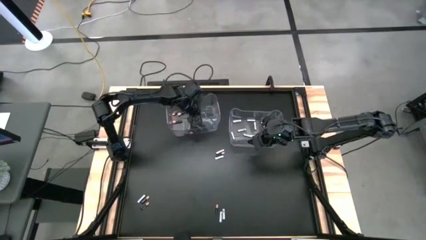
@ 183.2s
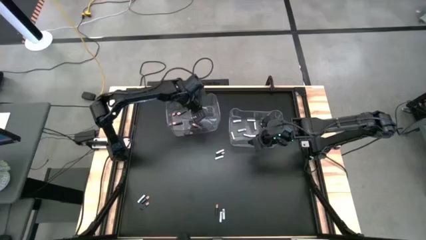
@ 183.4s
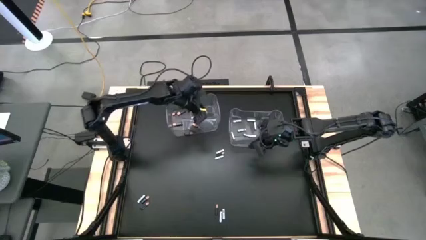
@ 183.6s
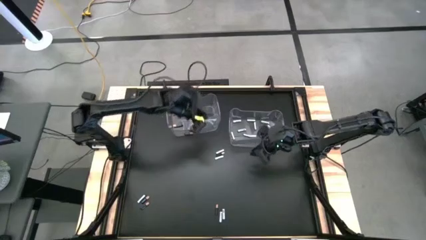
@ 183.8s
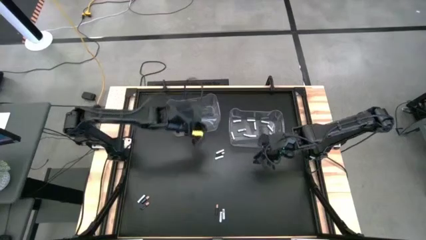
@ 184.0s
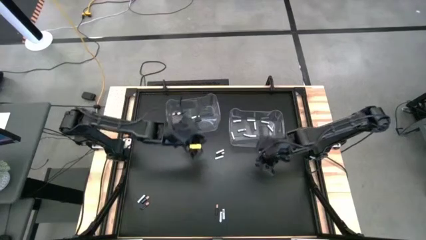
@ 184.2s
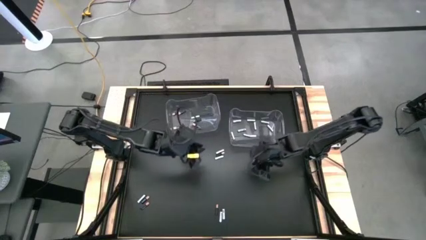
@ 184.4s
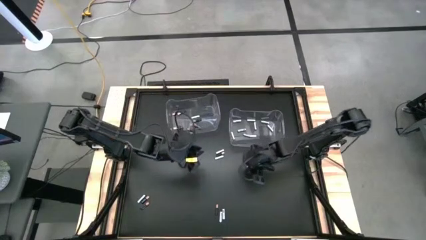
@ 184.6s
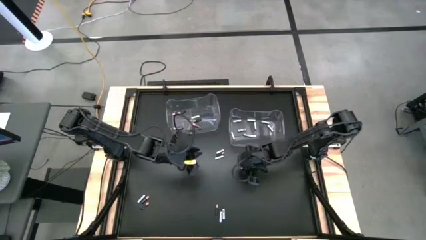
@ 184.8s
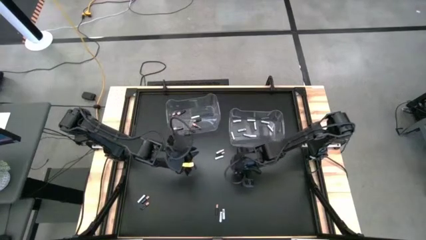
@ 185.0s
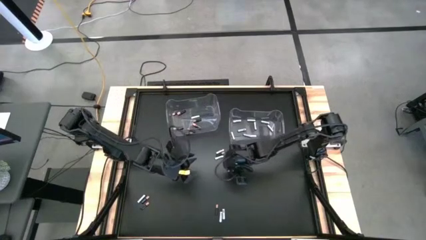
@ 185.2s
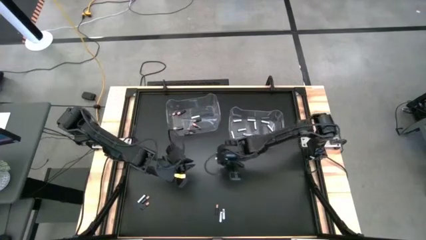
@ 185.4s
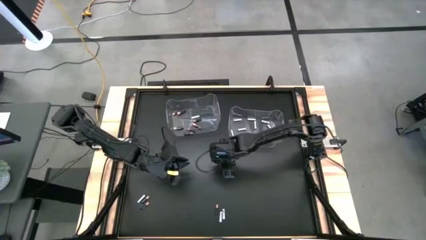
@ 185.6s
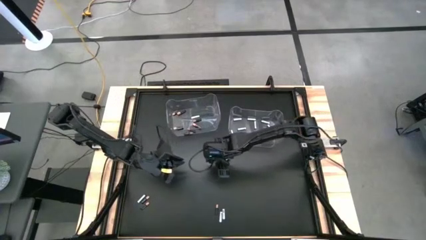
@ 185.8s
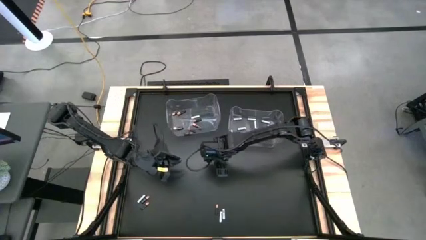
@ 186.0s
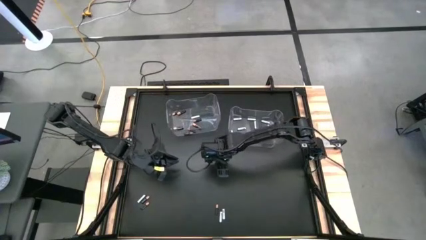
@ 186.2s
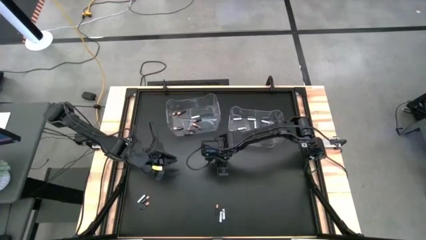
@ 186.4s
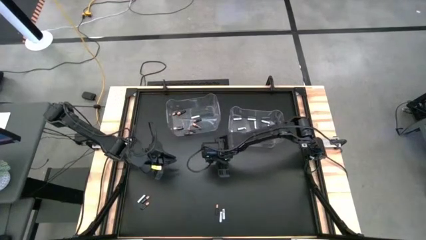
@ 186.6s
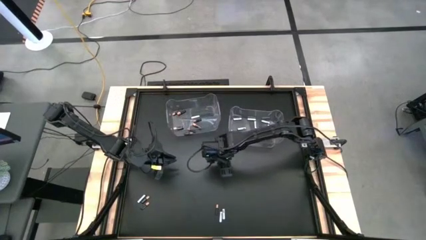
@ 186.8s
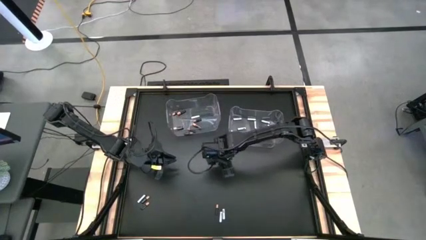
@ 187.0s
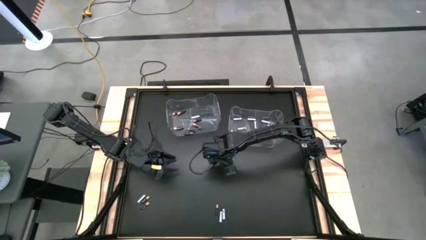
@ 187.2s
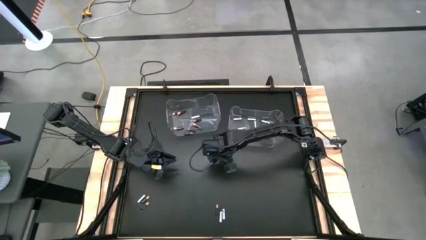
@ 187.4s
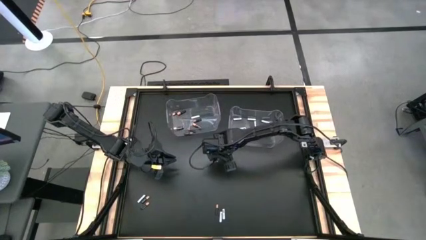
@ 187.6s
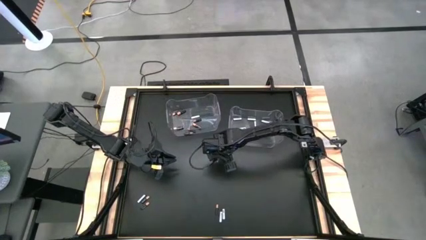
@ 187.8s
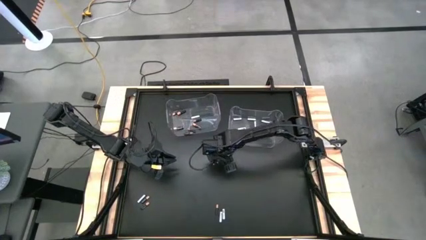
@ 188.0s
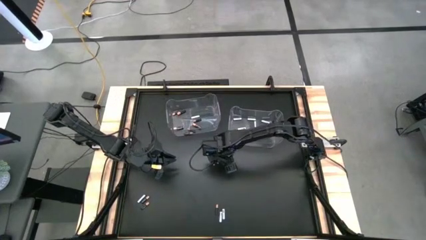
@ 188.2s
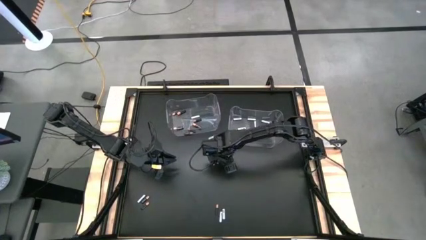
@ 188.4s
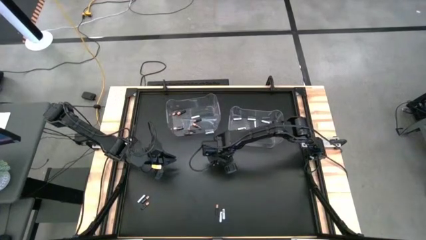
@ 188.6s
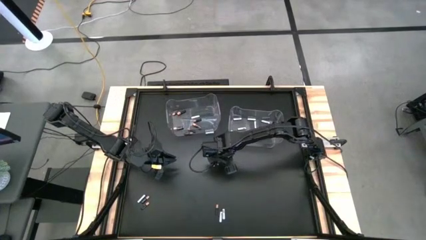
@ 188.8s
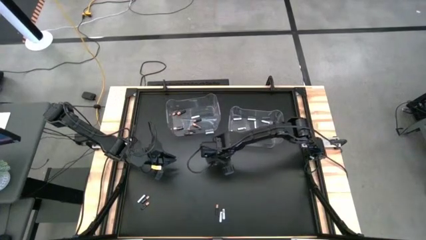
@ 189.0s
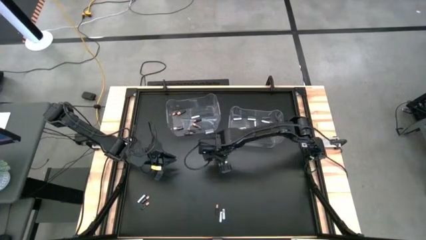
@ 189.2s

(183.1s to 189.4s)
Task: Sort batteries
Put the white battery into the right transparent bin

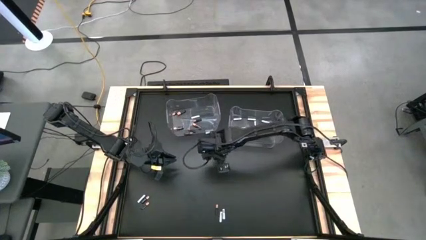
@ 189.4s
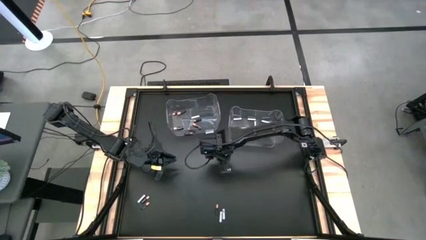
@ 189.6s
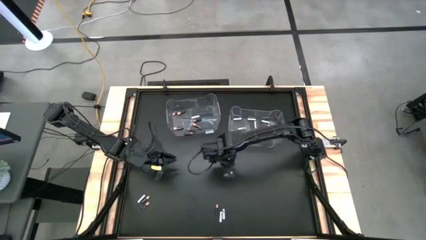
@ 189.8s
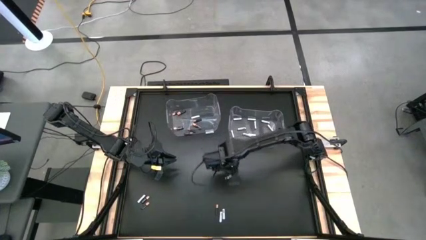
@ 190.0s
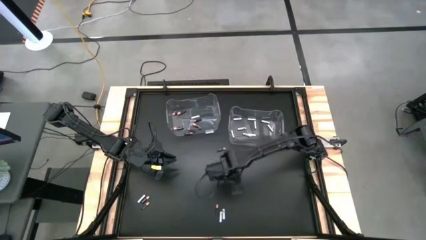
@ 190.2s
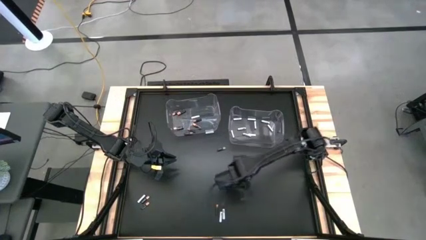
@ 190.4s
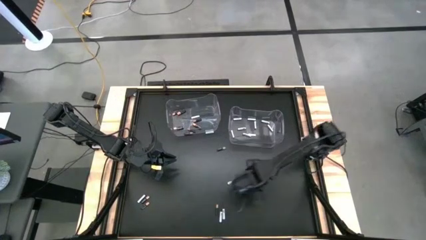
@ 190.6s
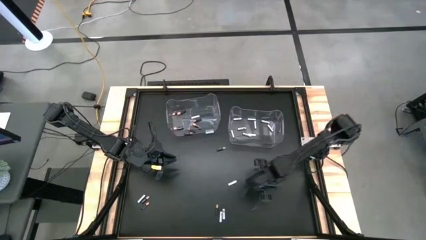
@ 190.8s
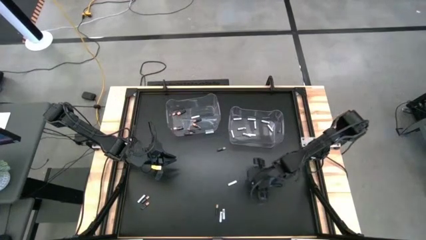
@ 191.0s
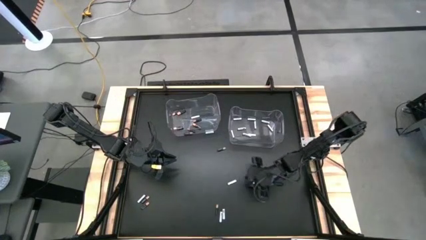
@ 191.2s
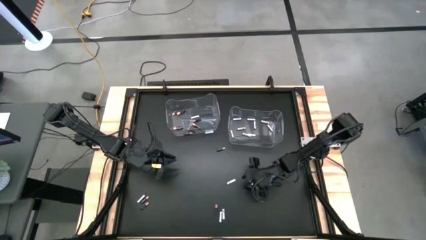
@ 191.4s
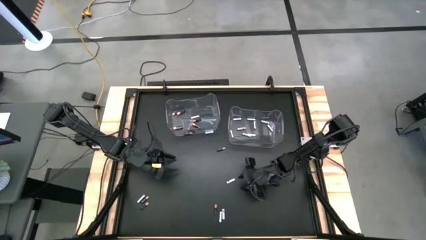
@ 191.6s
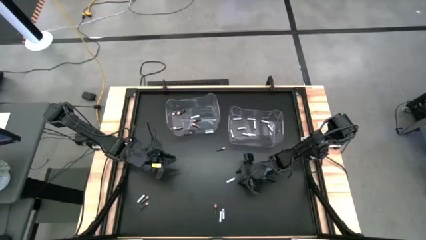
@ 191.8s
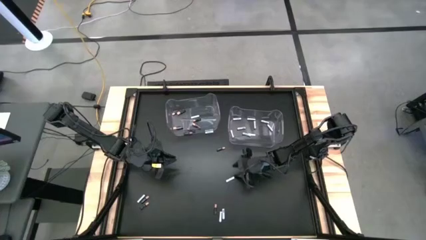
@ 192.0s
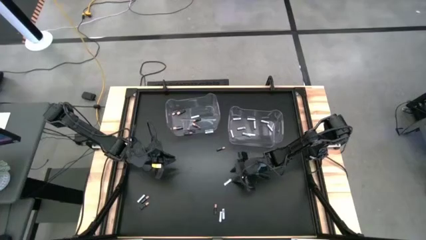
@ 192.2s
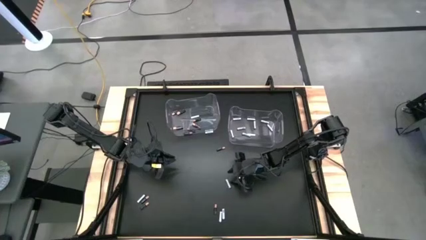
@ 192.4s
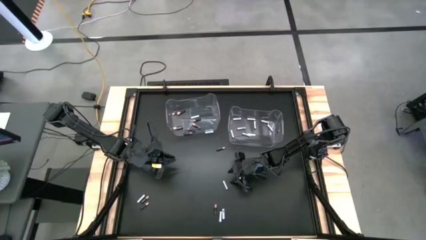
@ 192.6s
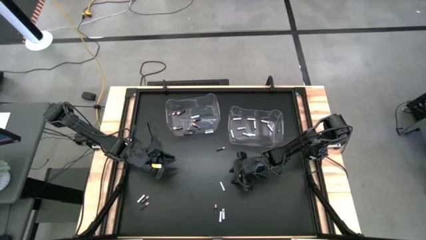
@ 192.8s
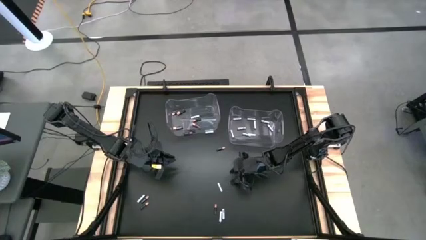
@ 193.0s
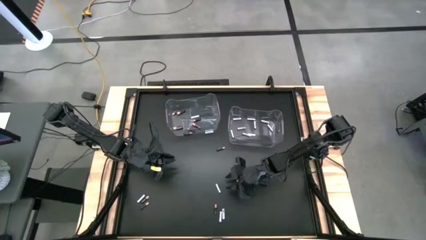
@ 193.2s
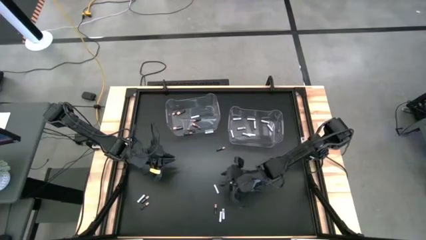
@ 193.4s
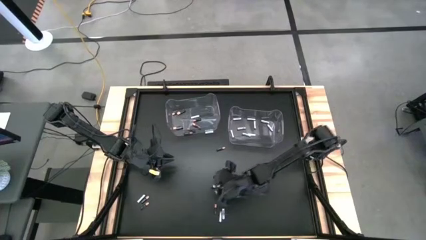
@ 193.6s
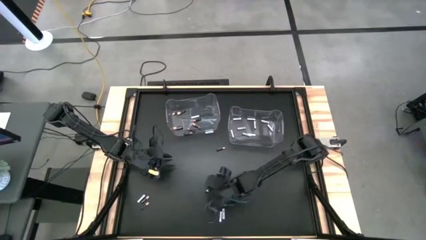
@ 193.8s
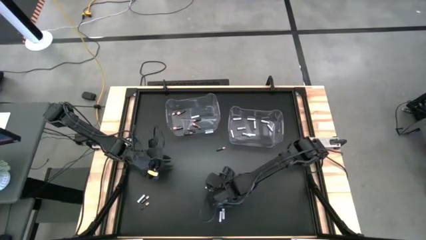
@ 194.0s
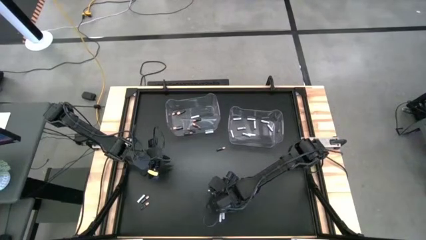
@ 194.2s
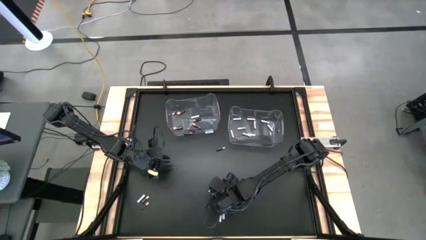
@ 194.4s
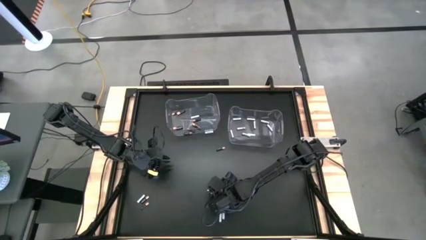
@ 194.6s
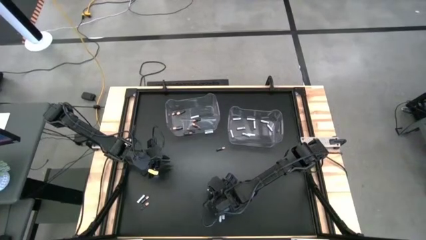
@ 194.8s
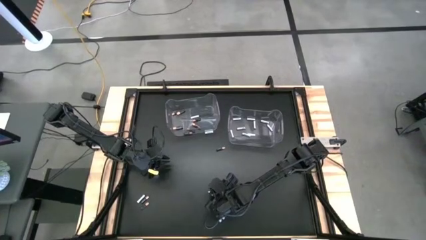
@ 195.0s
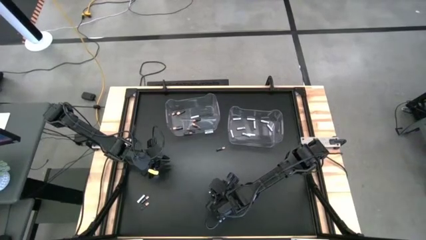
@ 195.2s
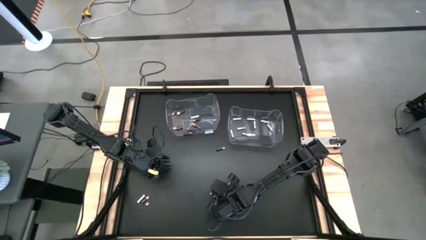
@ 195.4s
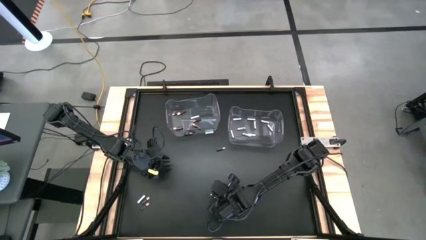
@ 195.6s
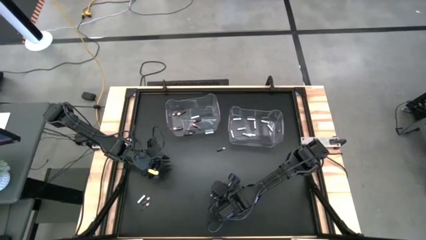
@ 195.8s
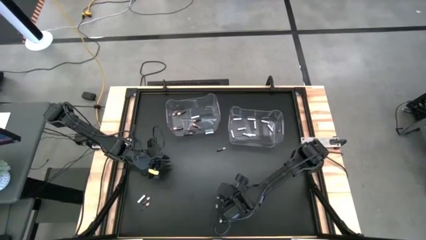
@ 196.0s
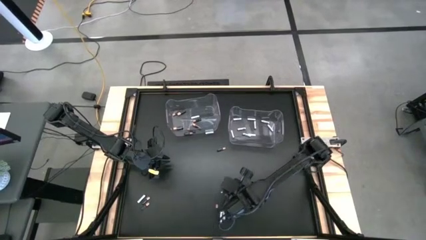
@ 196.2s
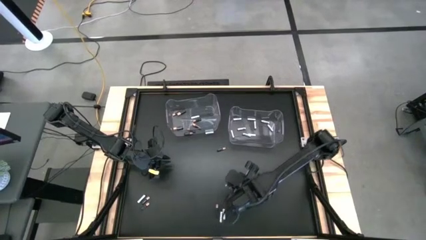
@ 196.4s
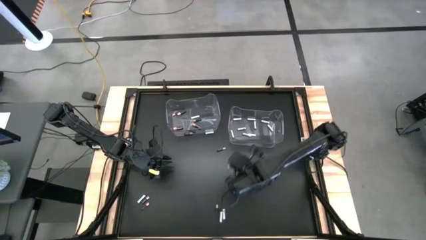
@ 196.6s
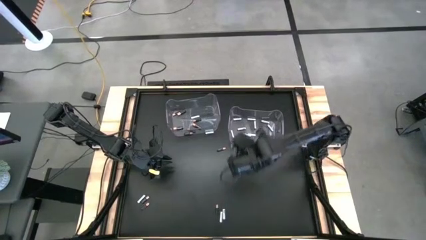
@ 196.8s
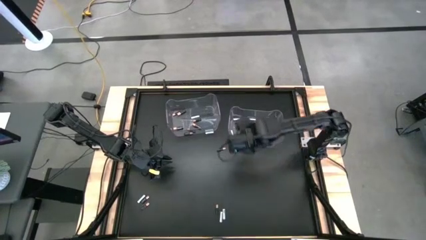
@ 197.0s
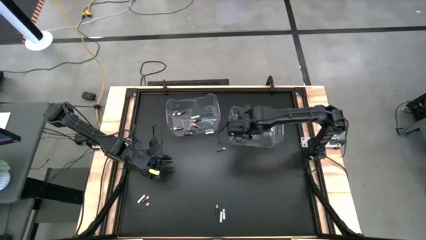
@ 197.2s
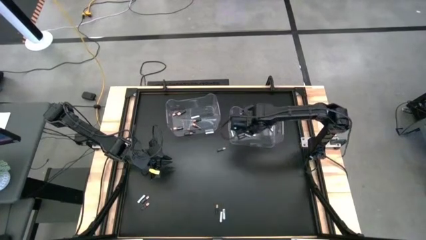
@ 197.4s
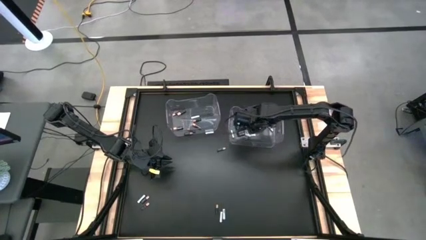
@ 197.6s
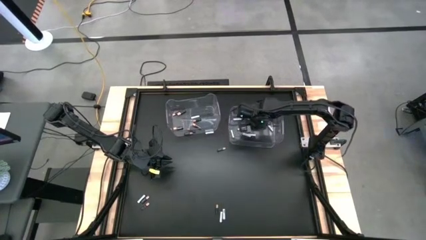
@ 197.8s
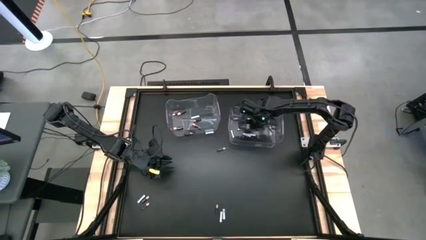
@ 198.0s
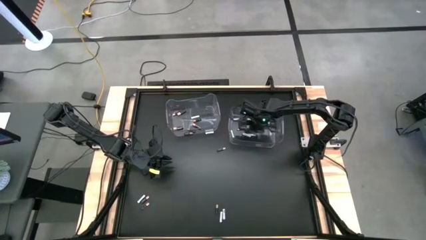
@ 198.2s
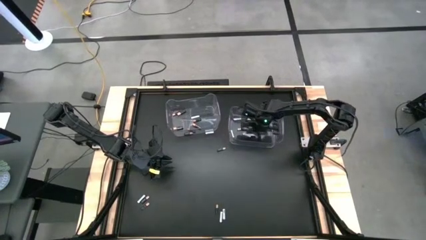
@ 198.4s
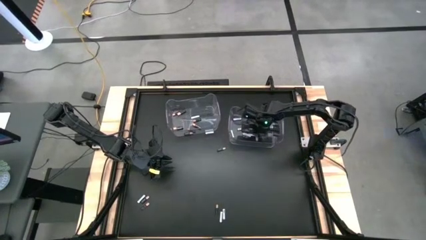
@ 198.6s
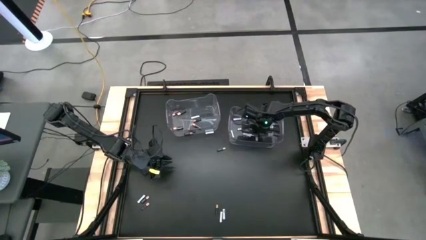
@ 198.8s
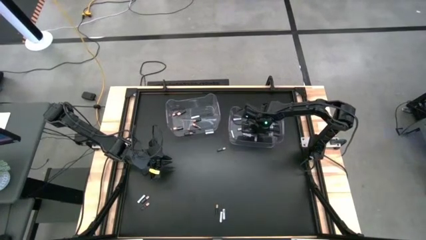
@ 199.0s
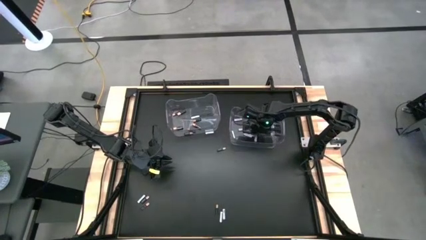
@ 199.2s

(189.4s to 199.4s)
Put the white battery into the white transparent bin
